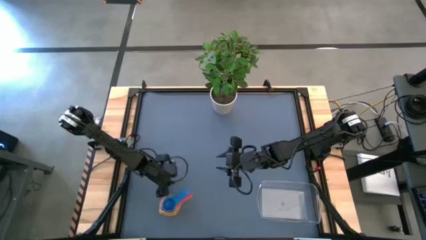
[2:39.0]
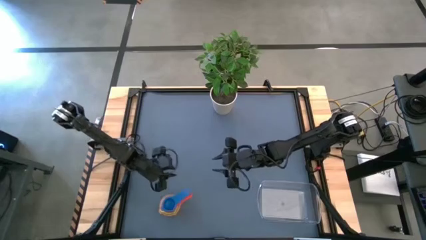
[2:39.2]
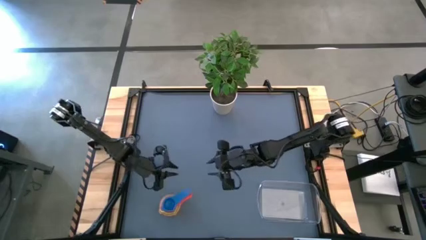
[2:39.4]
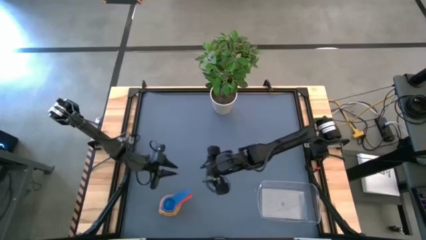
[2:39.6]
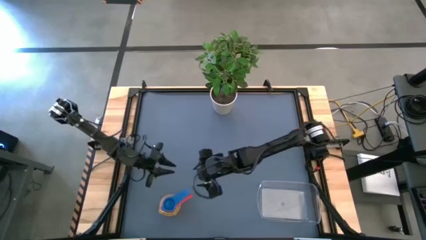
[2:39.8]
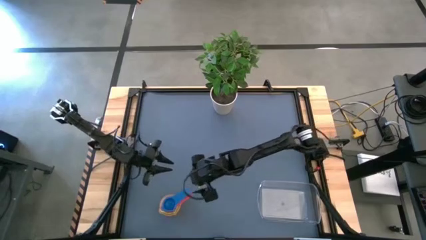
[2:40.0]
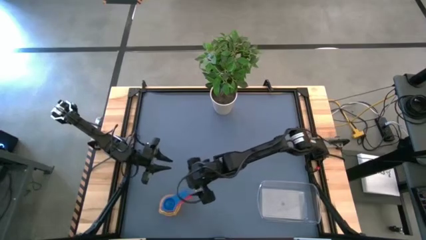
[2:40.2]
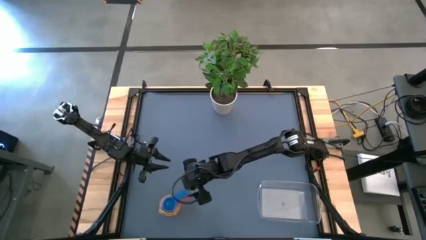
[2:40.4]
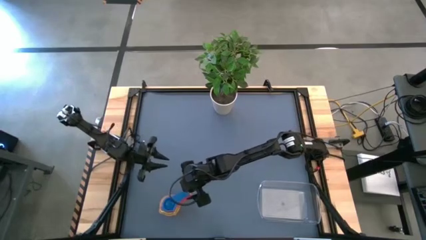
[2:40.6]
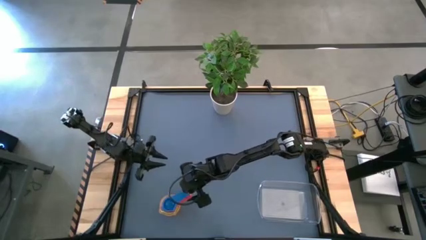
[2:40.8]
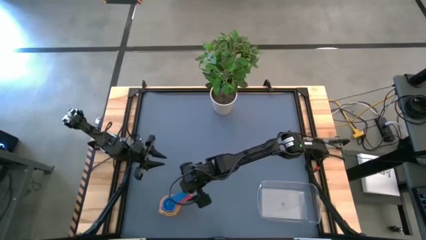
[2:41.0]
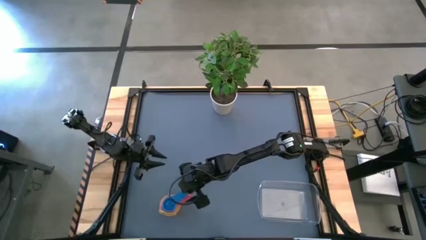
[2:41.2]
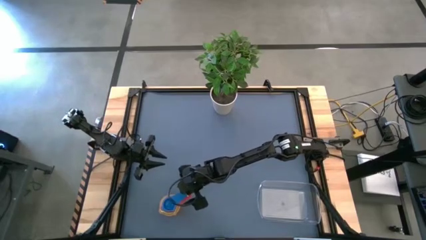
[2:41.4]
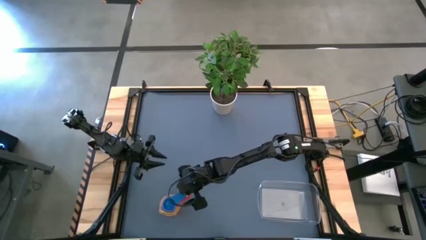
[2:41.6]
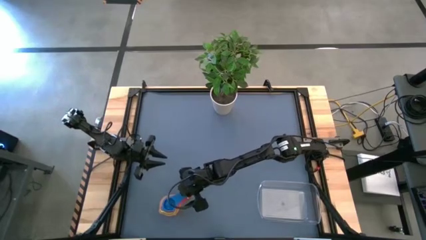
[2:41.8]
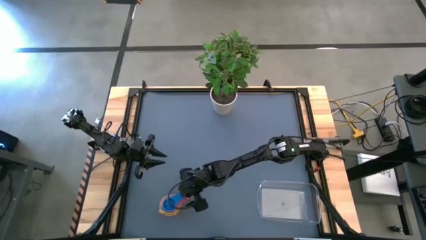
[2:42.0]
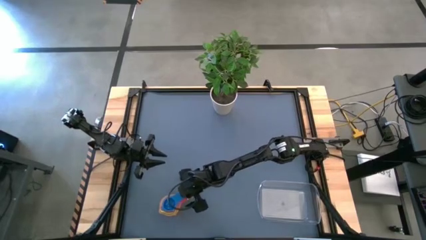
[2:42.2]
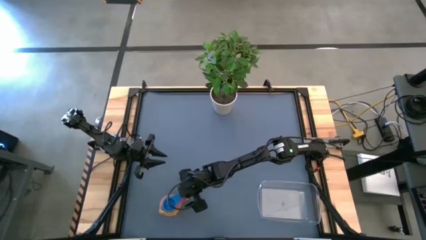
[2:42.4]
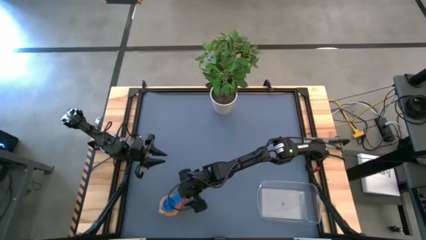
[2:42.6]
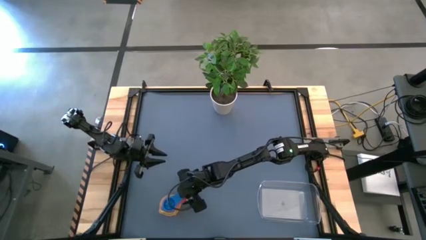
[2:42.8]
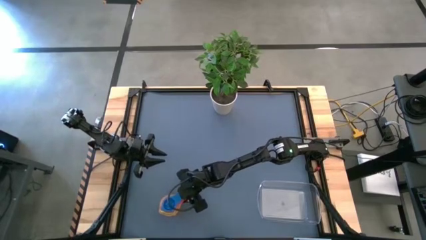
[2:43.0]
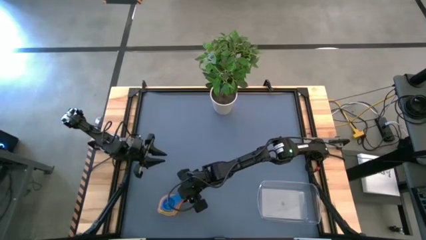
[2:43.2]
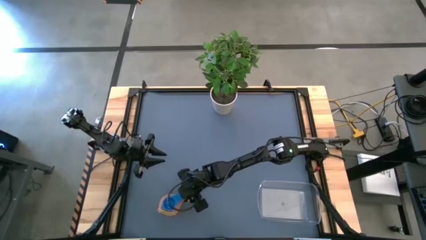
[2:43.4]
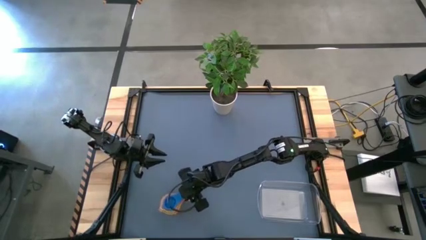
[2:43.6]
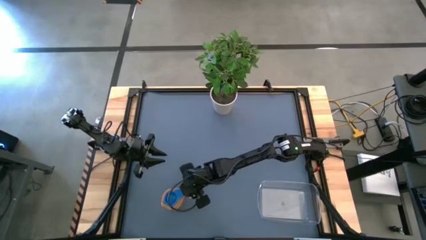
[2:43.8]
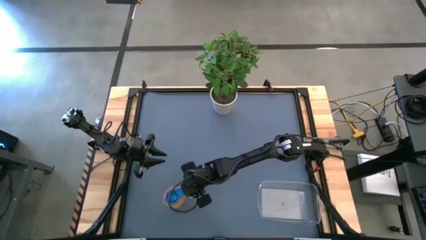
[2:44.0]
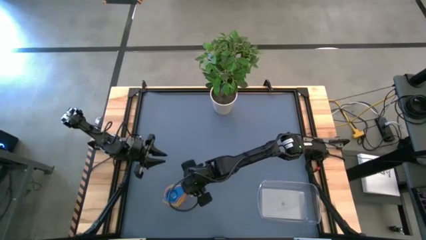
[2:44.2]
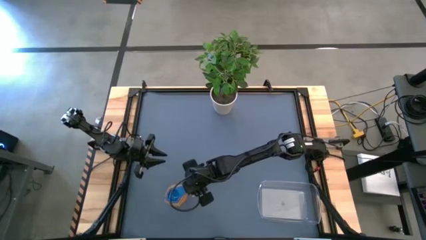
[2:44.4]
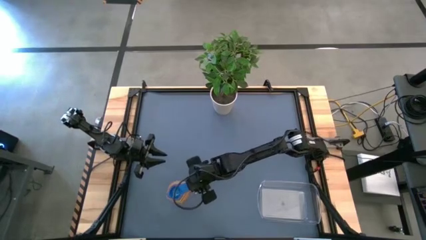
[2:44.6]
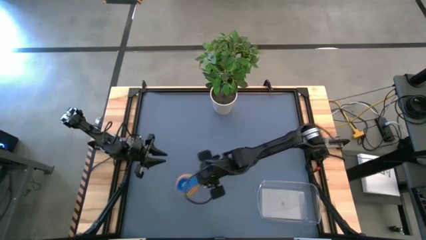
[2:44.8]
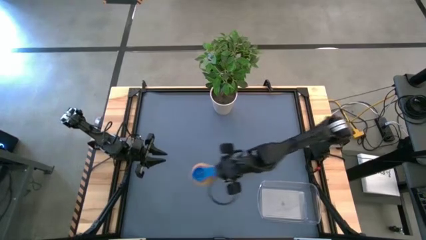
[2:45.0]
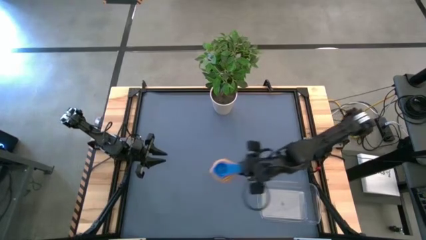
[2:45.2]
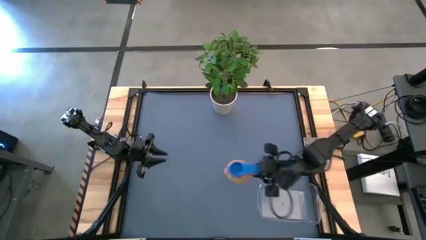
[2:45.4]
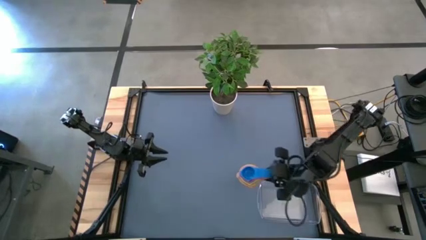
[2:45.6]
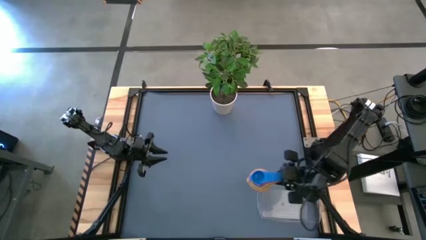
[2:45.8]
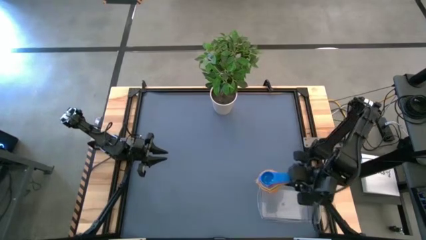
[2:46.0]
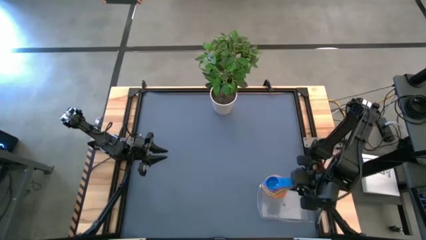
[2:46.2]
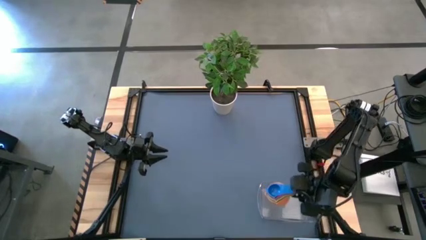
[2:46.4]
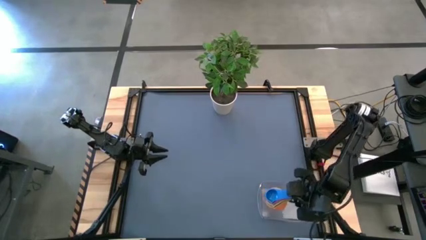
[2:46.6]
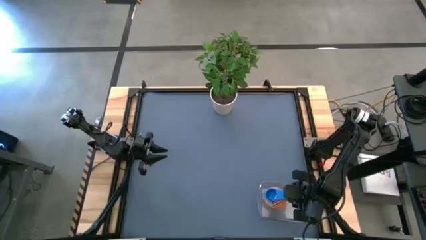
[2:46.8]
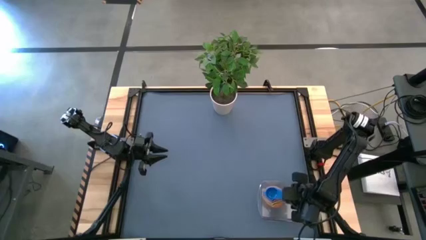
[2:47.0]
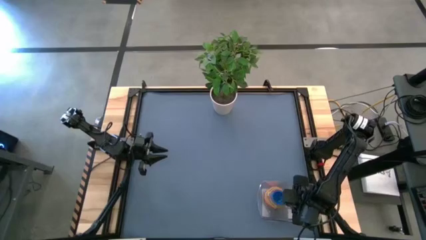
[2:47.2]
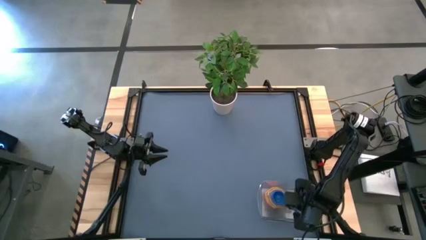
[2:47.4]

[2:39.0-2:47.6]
Task: Nest measuring cups in basket
Put the nested measuring cups into the transparent bin

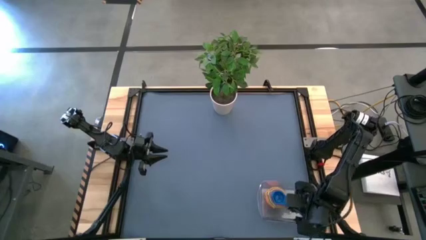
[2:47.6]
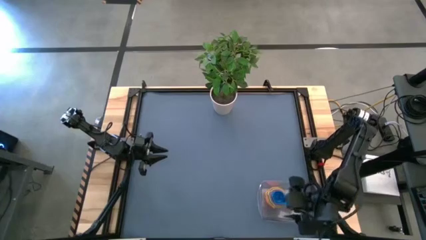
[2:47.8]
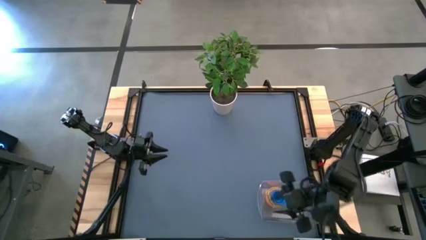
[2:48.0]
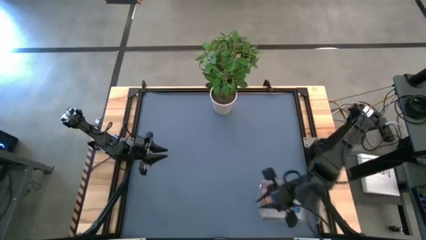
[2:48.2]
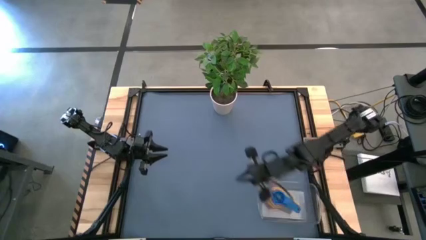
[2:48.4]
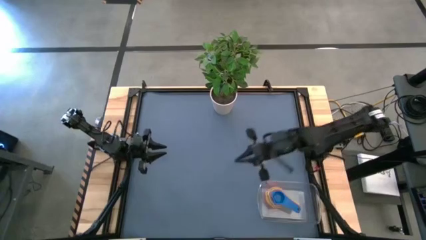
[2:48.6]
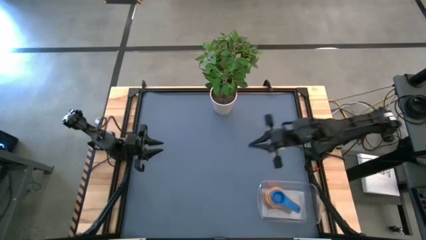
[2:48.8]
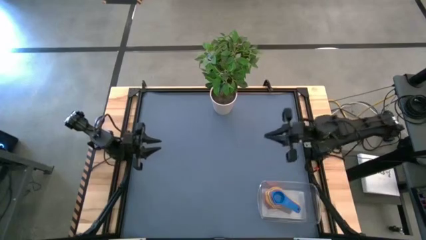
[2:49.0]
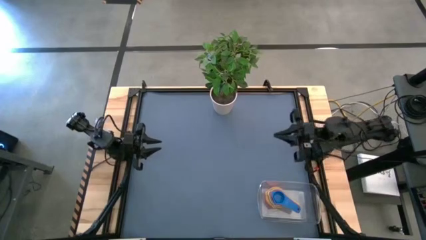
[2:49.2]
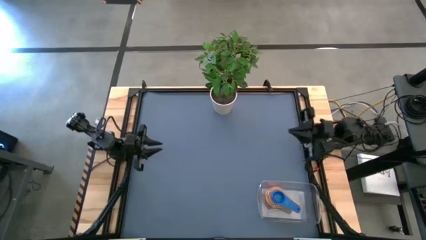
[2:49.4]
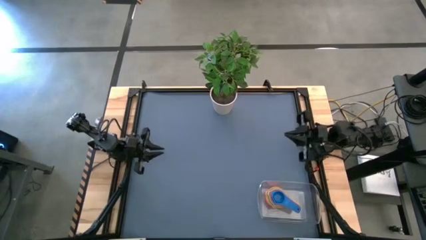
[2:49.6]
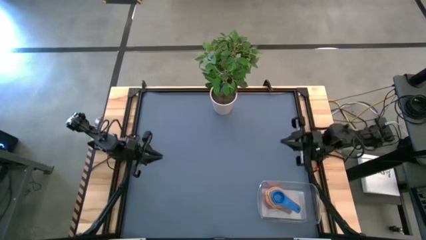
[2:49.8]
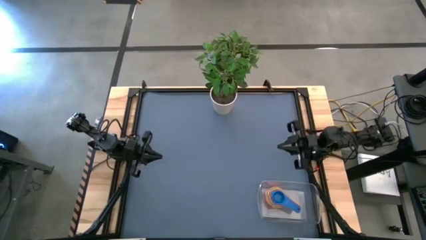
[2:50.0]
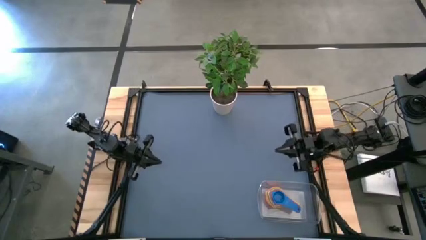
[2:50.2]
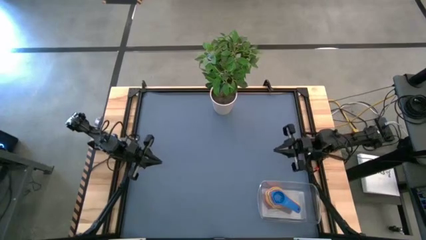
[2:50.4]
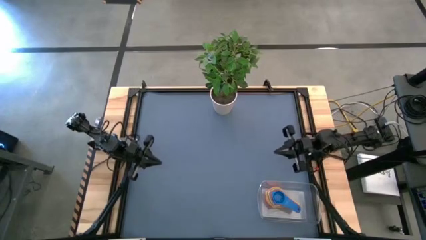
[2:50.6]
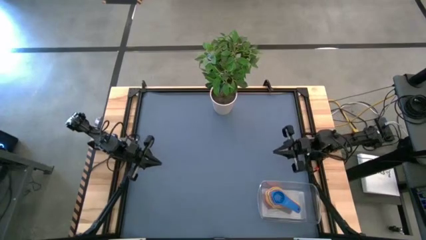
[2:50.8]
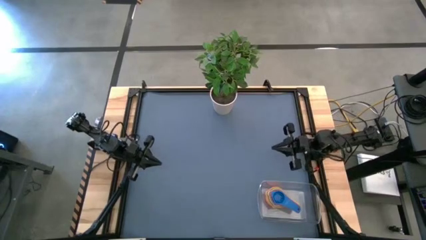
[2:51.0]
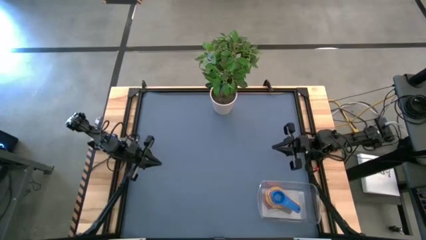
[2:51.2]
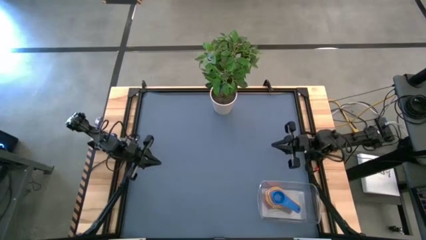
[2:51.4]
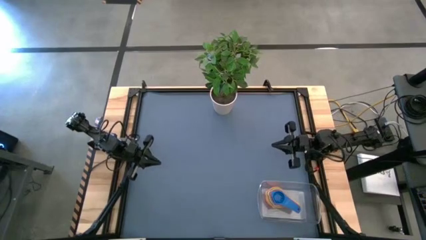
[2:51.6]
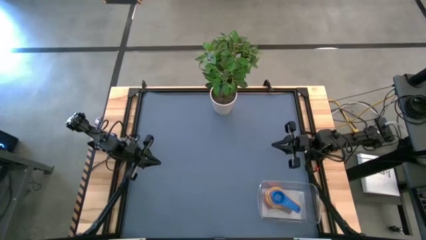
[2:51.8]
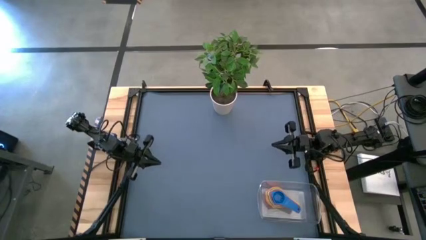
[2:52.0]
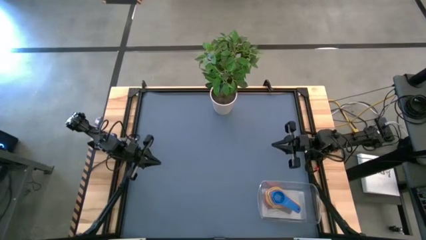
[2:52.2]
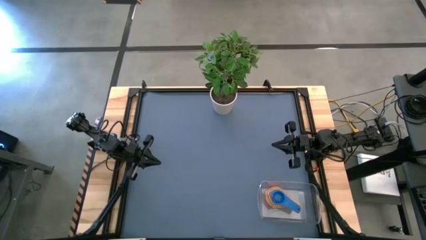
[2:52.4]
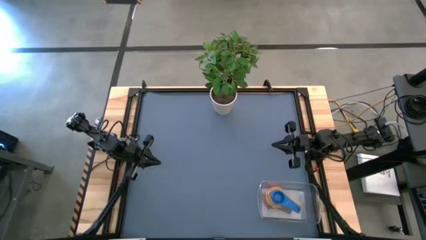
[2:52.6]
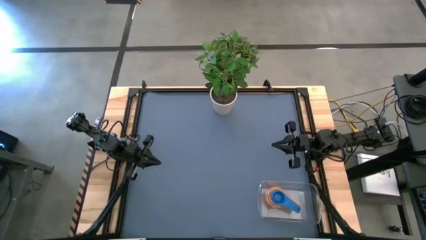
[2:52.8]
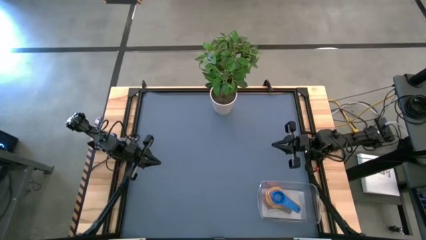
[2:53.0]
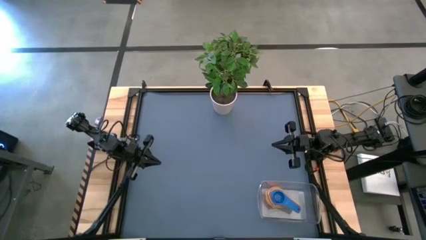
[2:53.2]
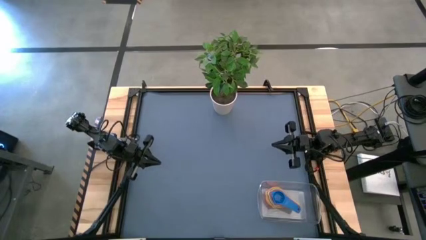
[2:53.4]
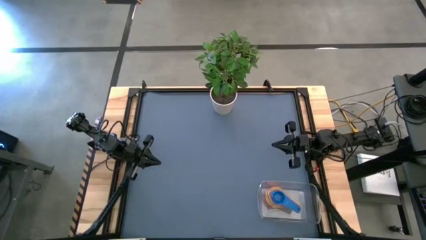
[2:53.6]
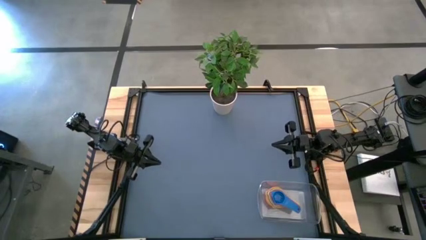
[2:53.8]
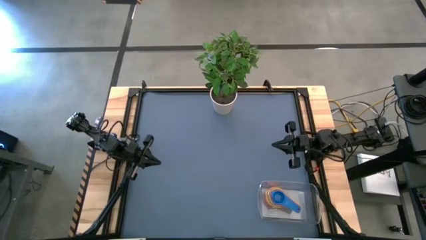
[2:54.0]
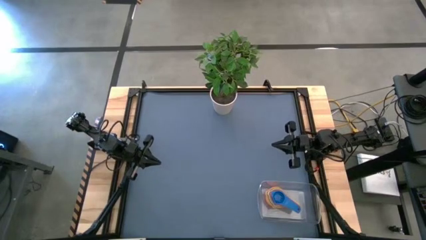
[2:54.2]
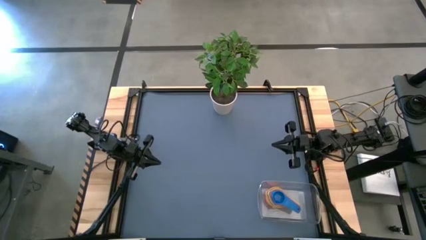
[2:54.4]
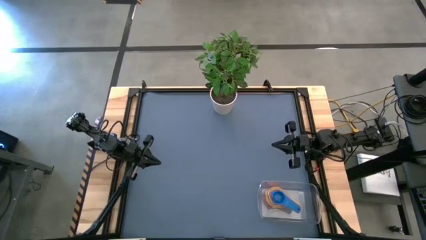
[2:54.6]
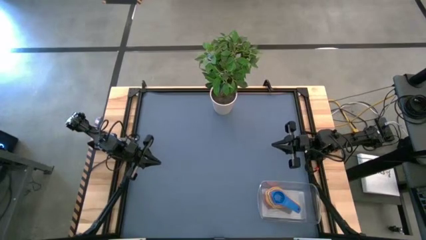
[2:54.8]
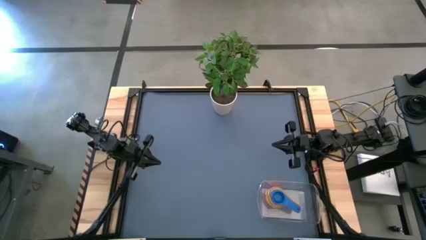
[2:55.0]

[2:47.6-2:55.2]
Return to Home Position
